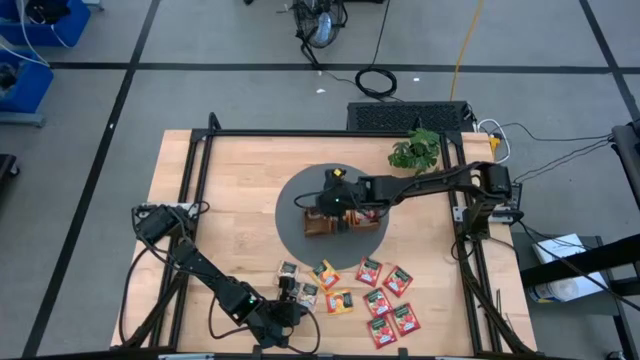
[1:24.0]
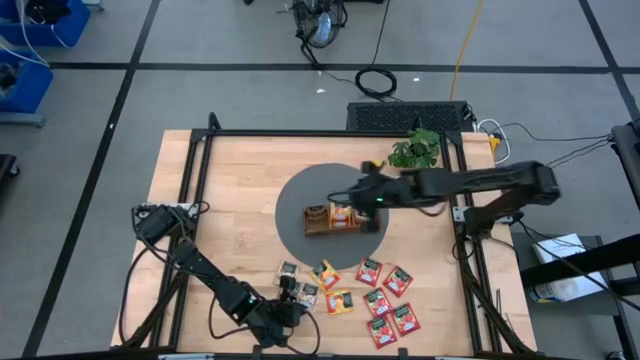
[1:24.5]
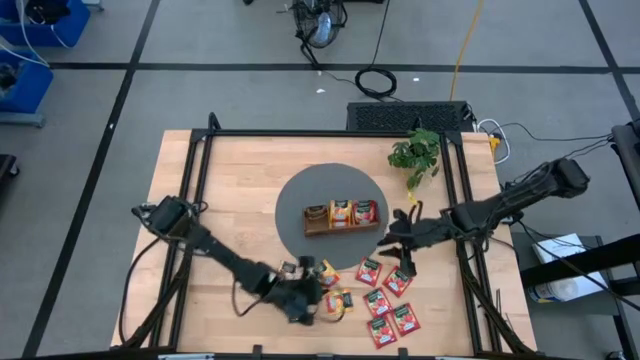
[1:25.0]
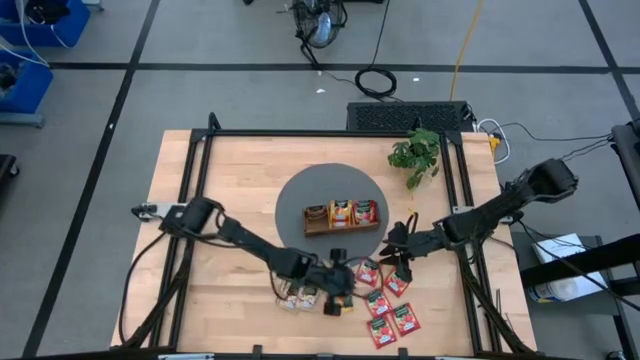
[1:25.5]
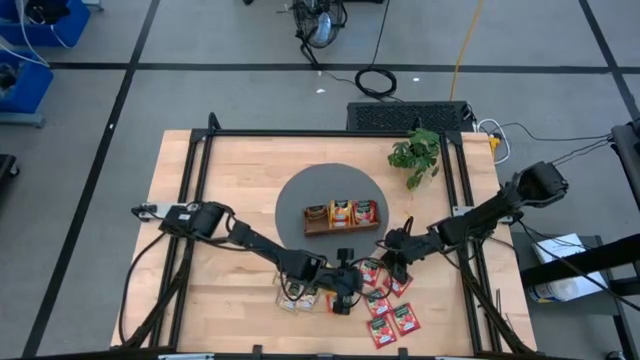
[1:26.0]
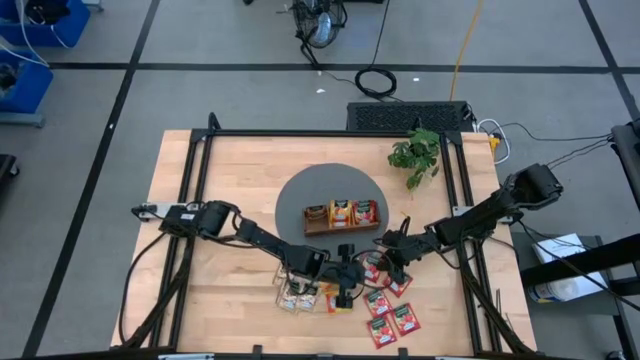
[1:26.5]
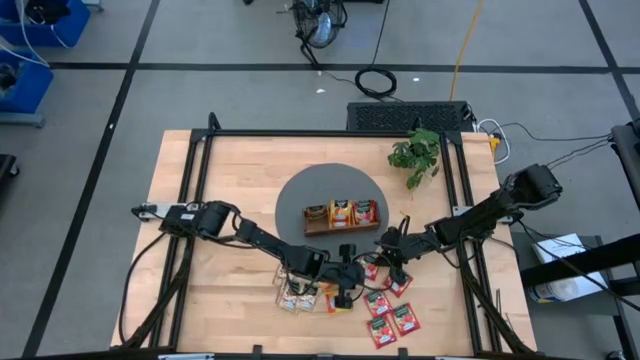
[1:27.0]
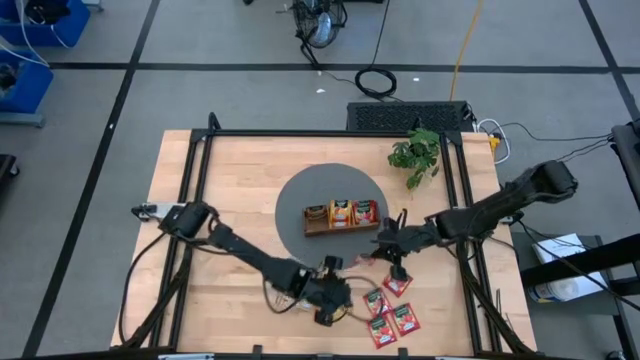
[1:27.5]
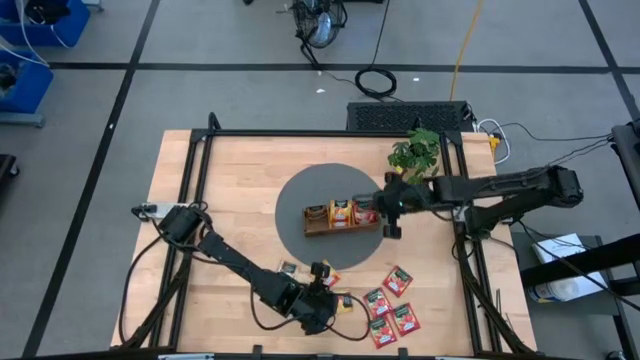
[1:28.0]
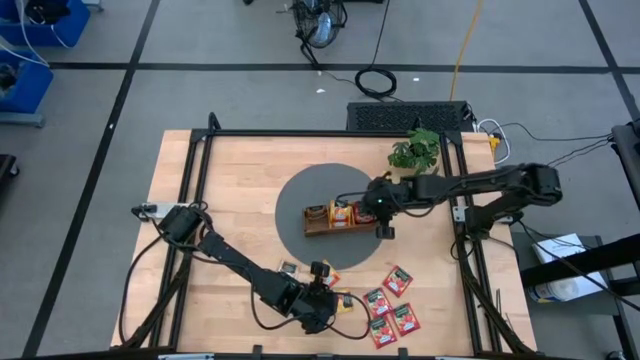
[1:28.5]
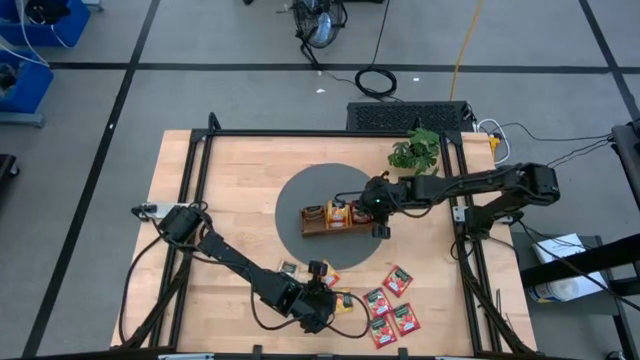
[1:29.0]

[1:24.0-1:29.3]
Task: Pick & Place Tea
Put the red tea bag into the right compartment of the wooden organizer

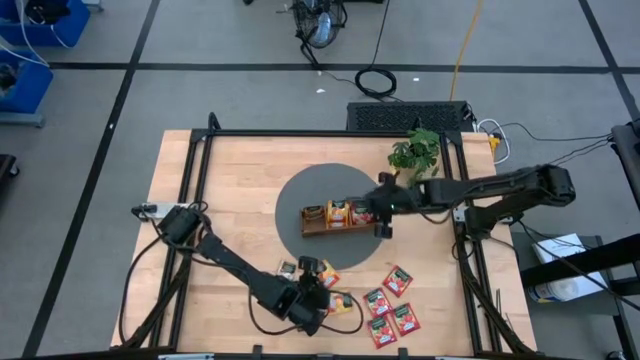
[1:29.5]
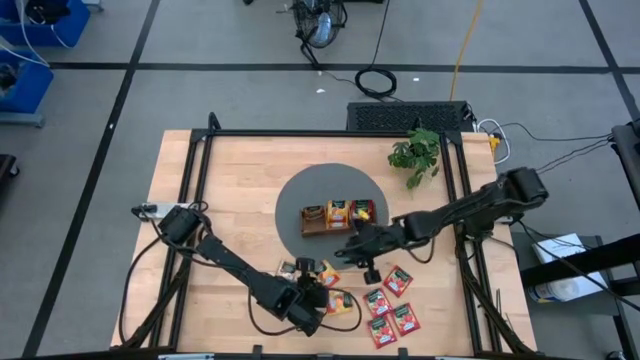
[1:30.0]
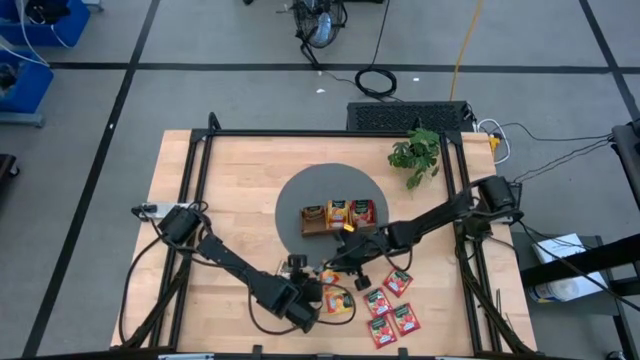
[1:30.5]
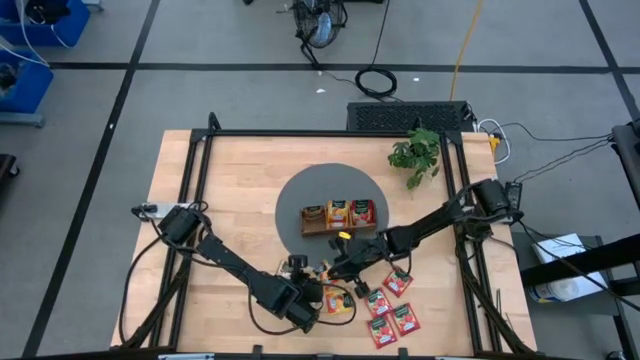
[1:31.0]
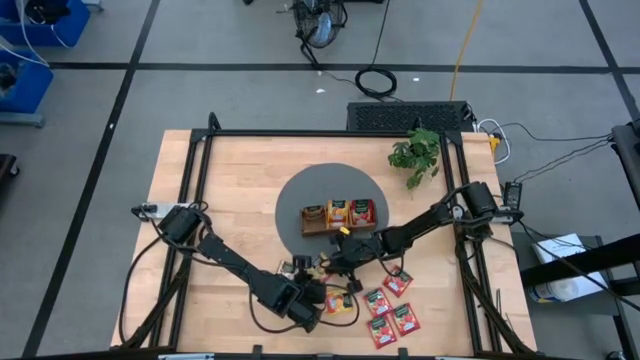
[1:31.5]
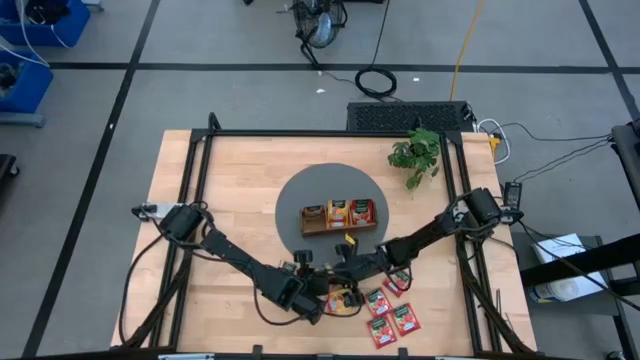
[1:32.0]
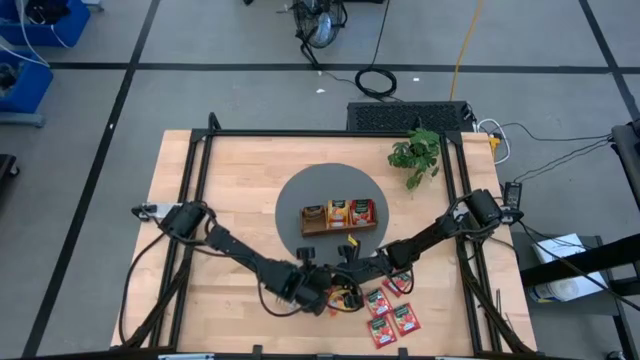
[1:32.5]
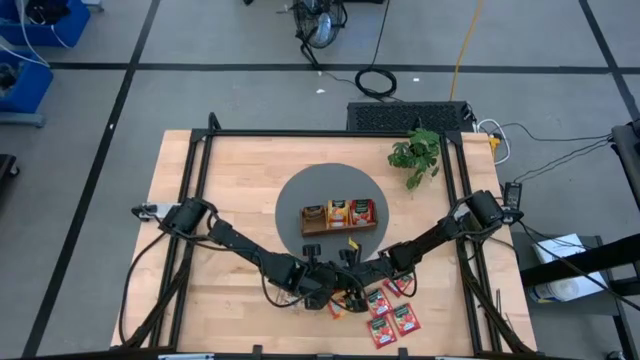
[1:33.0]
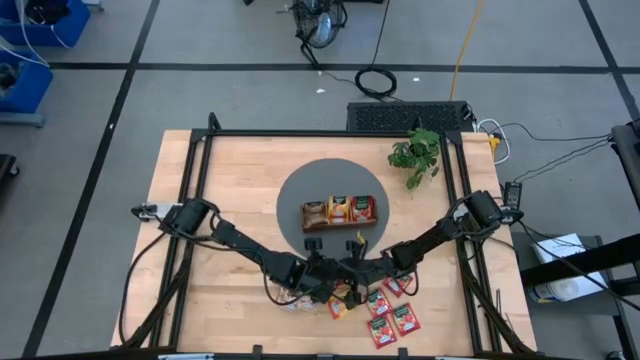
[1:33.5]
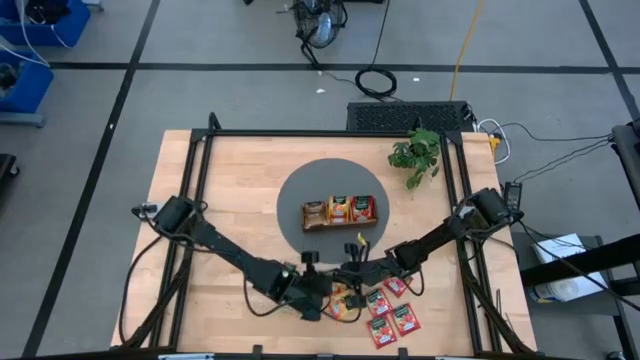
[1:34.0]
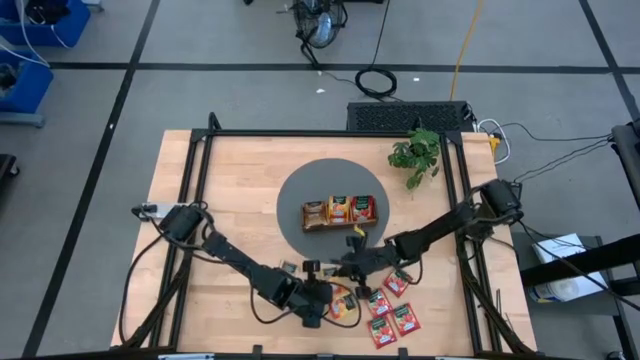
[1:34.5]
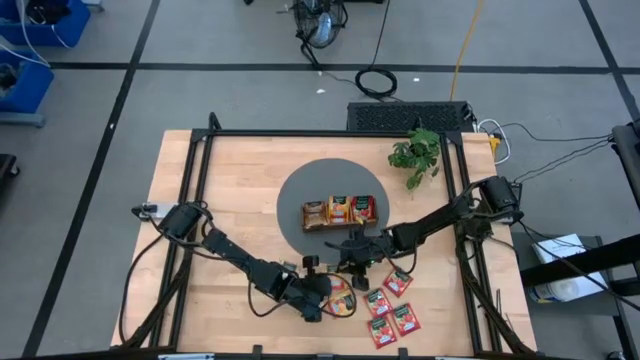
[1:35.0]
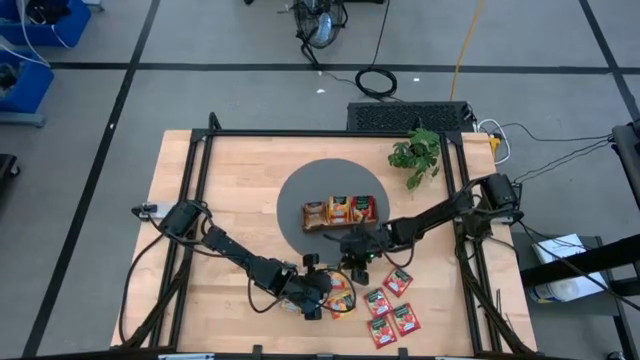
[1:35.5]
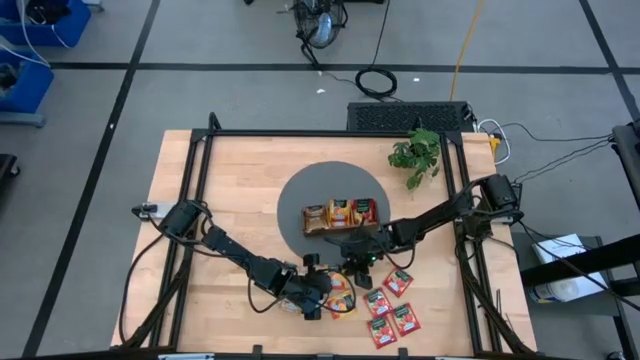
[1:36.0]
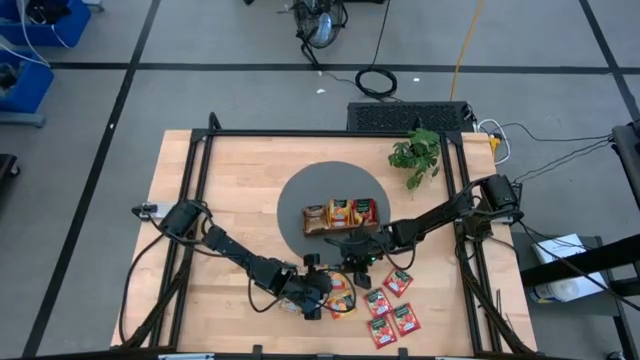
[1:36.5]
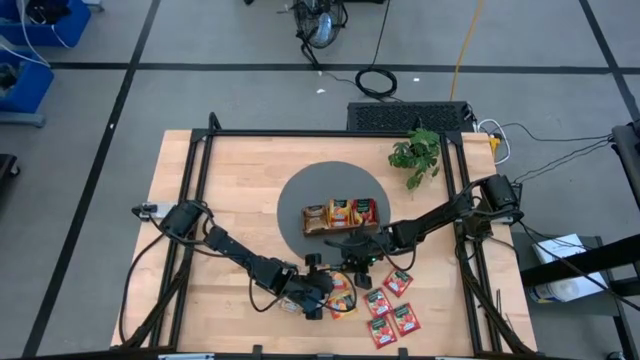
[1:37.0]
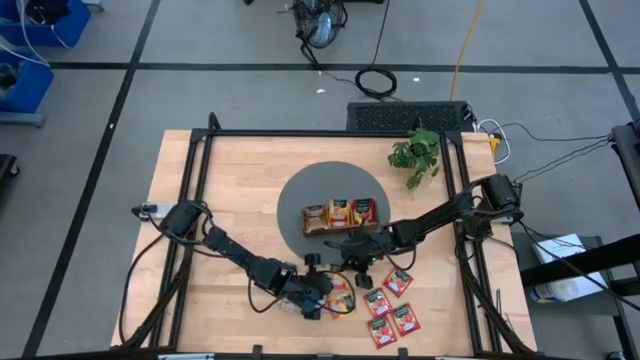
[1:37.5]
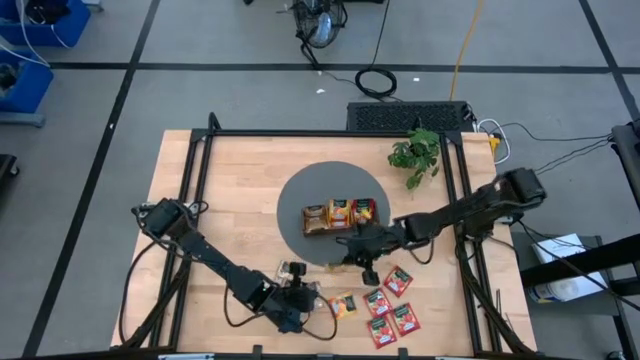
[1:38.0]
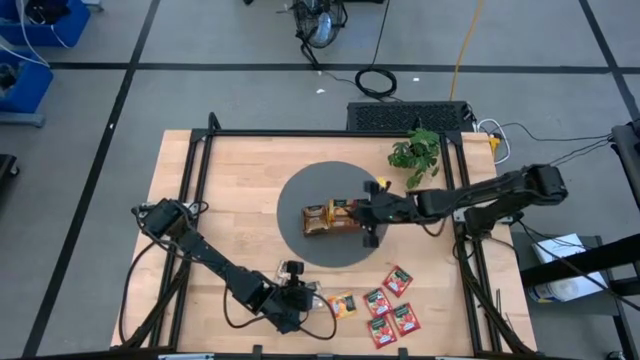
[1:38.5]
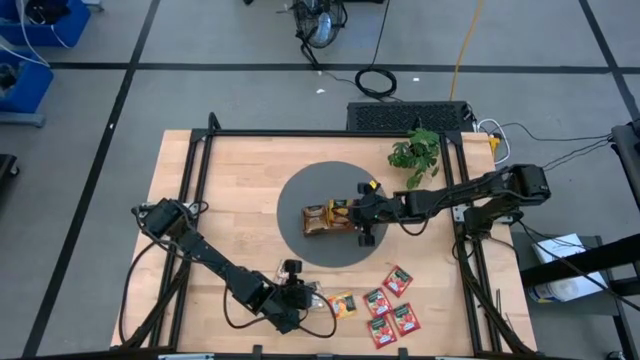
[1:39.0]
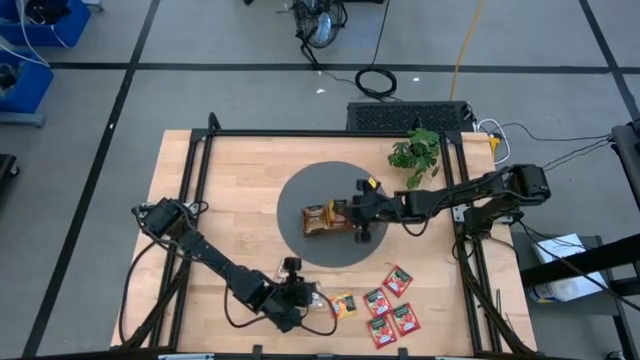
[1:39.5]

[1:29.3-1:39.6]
Put the yellow tea bag into the middle compartment of the wooden organizer

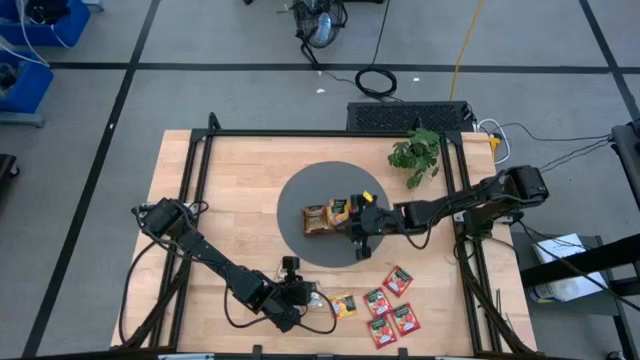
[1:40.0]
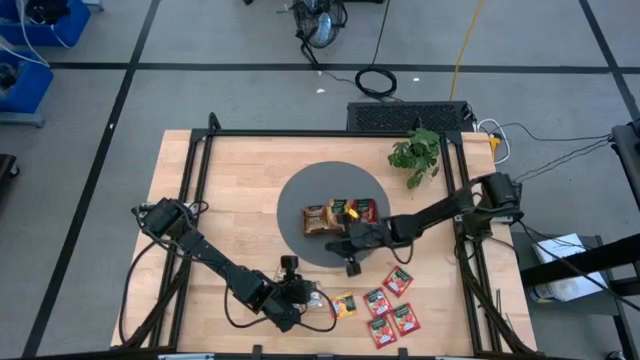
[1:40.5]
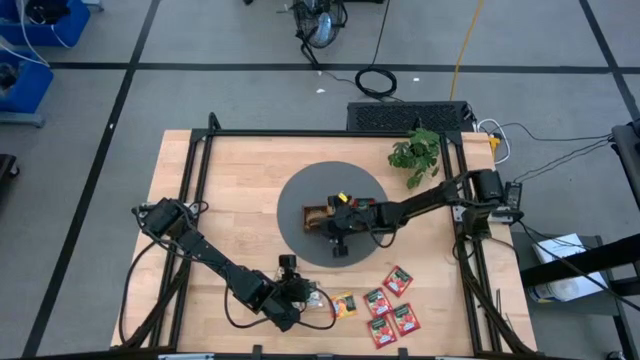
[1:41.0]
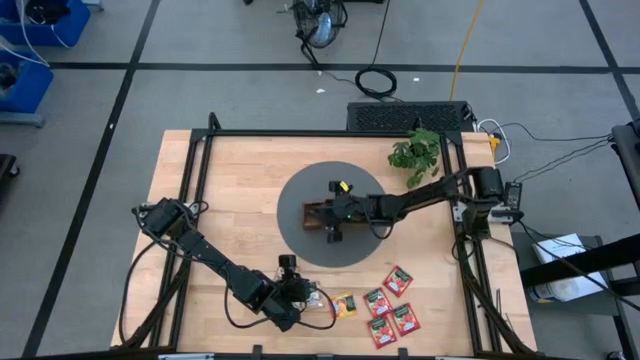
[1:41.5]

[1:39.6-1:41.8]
Adjust the gold tea bag in the wooden organizer

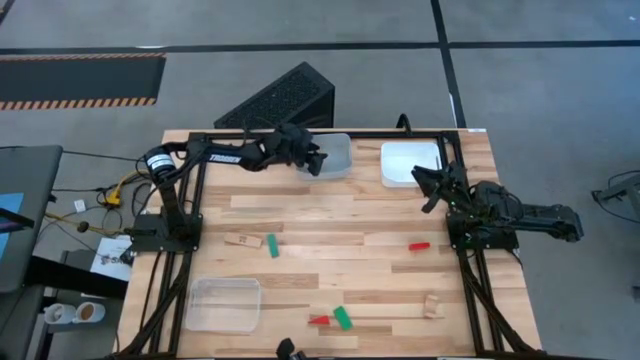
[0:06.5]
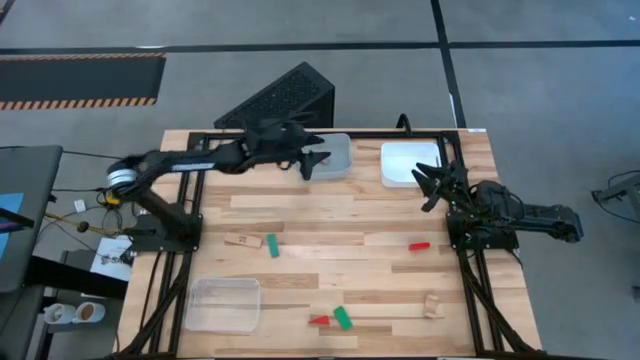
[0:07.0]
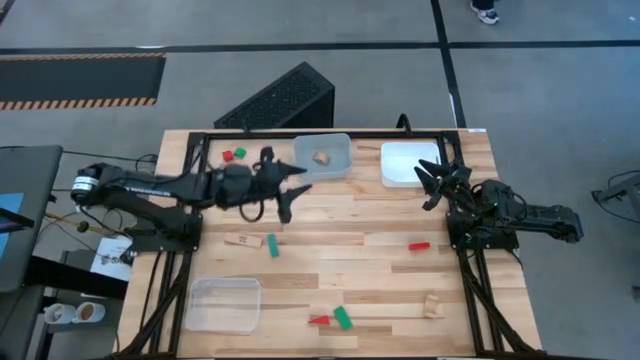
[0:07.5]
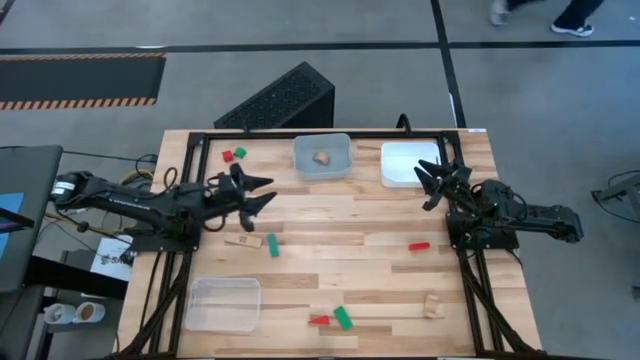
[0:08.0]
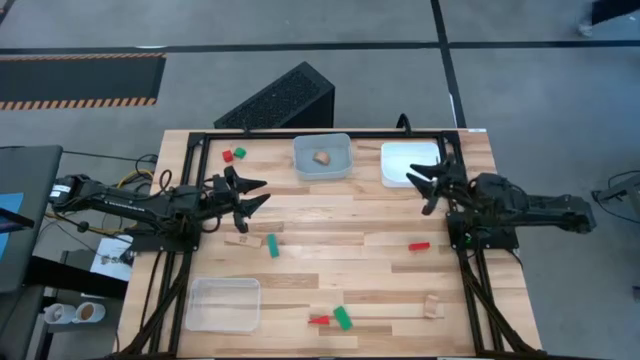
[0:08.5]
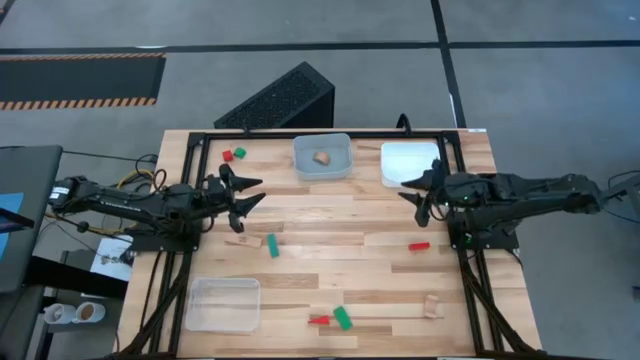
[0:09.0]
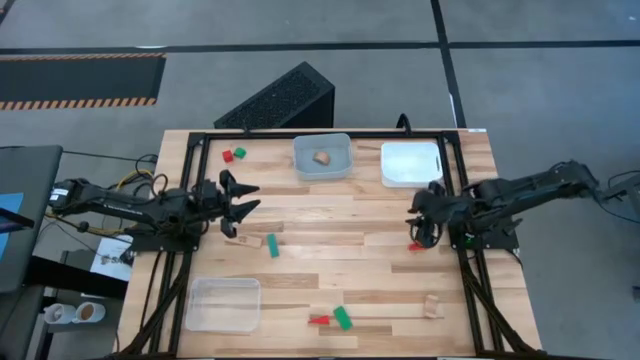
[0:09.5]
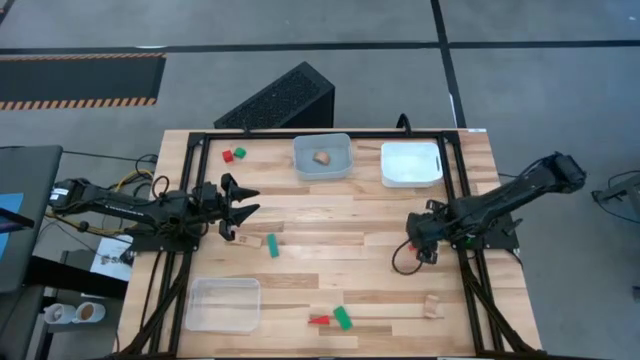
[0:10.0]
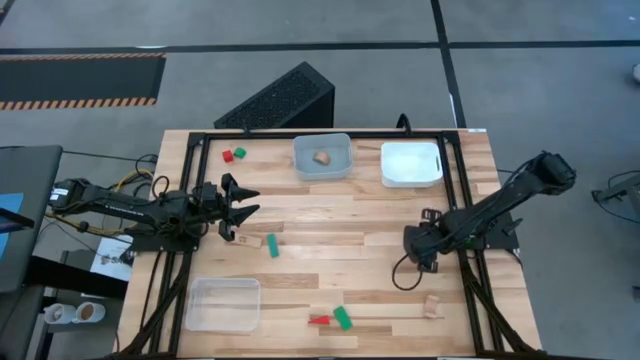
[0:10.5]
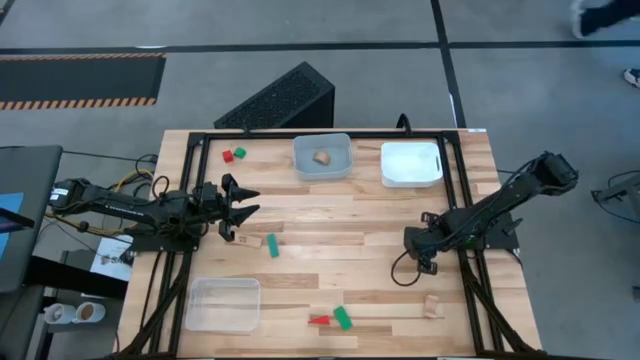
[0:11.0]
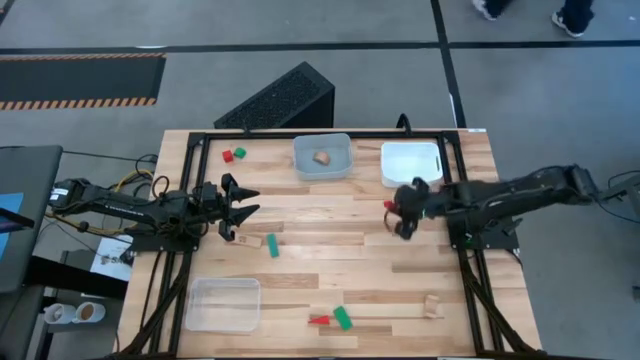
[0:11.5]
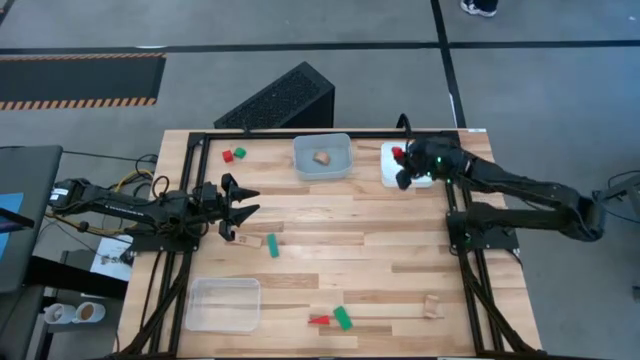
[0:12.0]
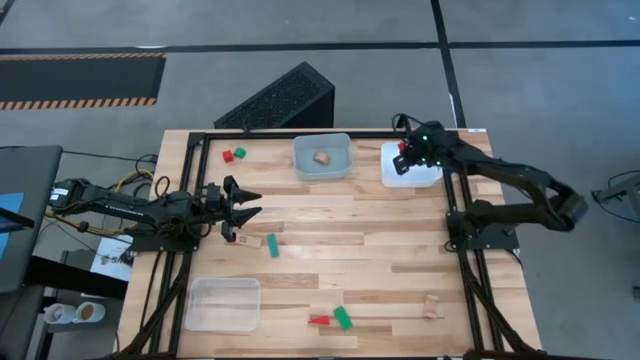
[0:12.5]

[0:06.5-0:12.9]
Task: Sort & place blocks by color
Put the middle red block into the white bin
